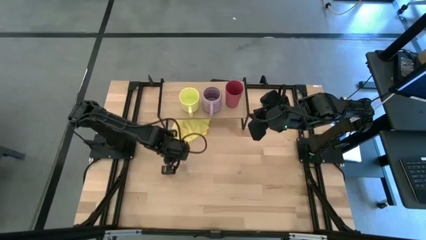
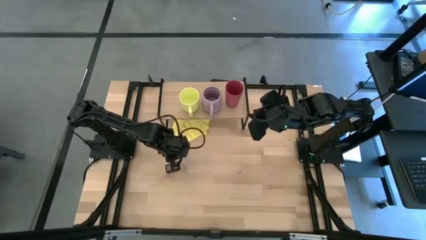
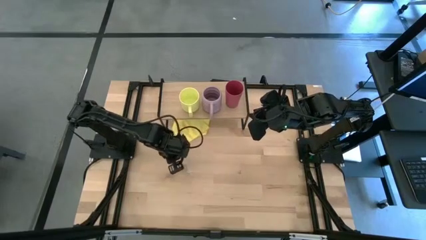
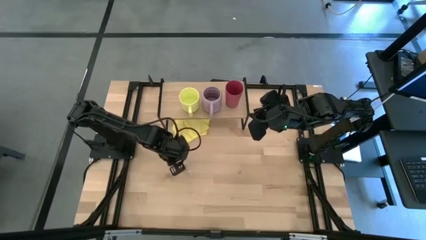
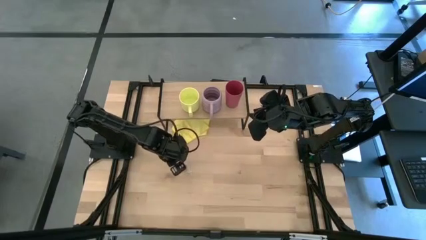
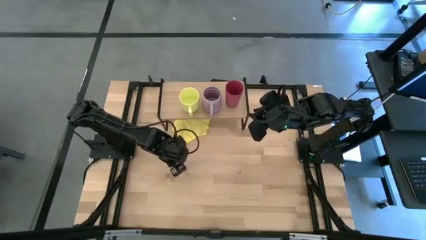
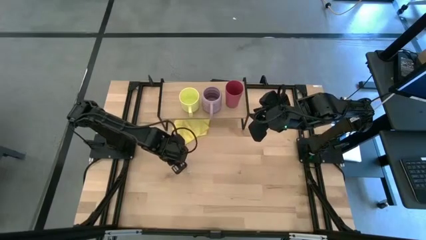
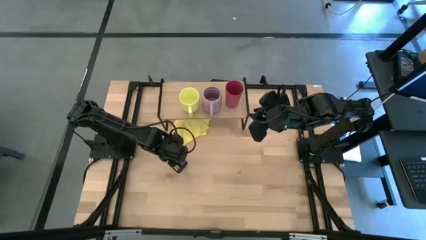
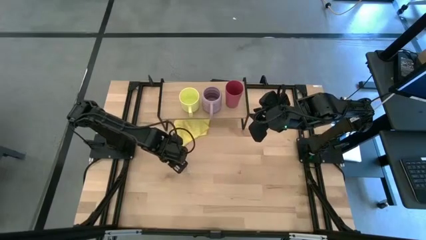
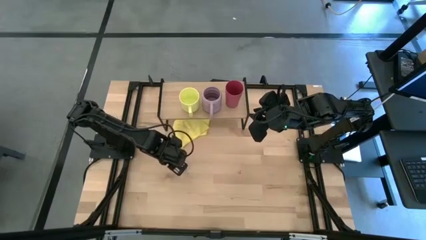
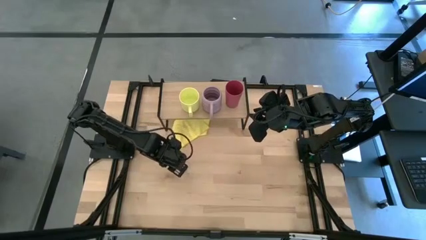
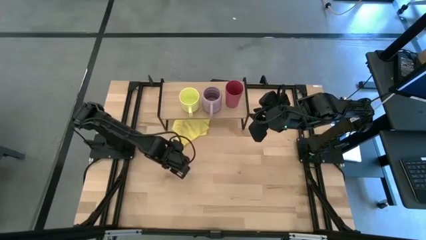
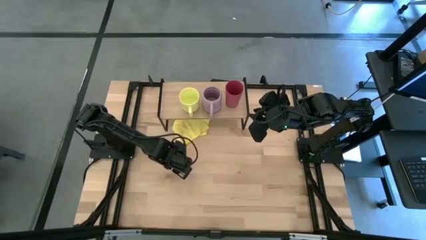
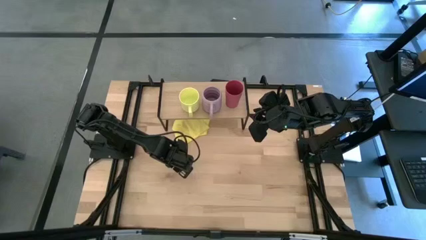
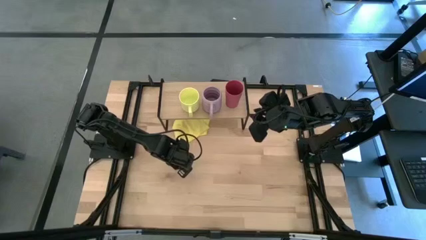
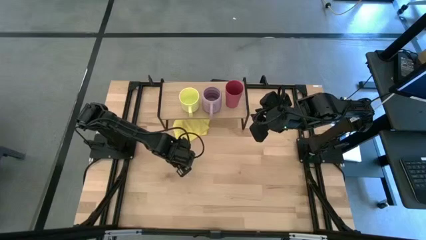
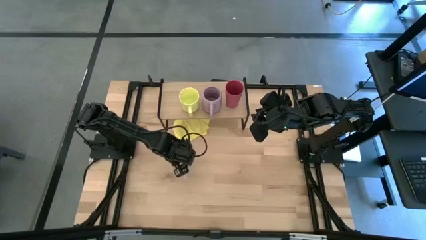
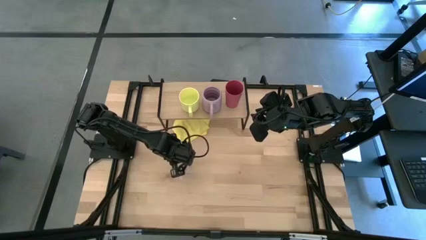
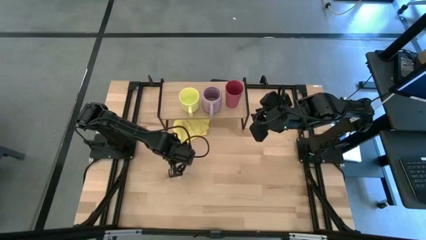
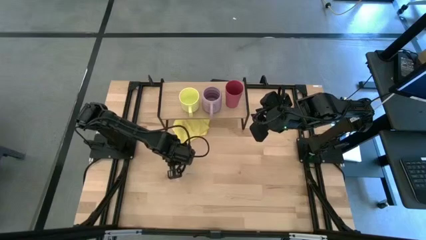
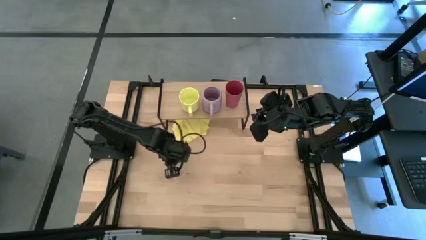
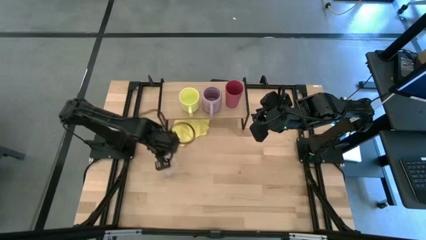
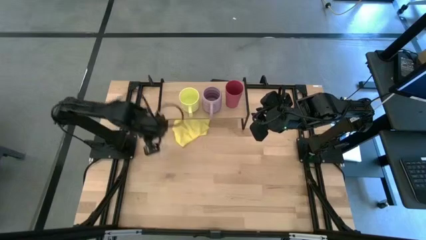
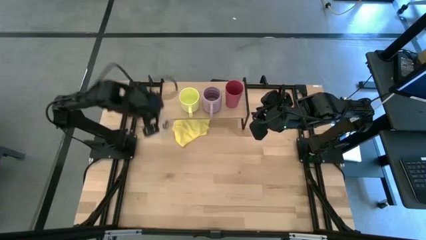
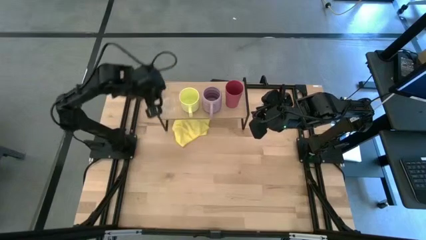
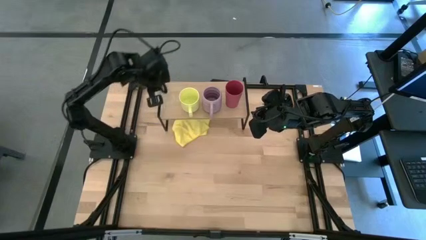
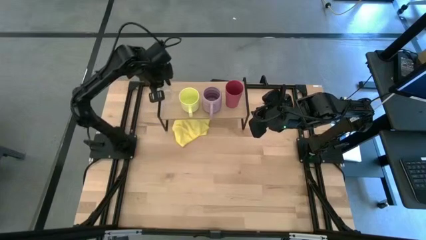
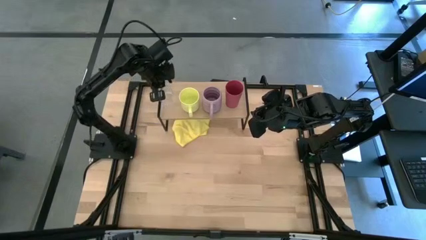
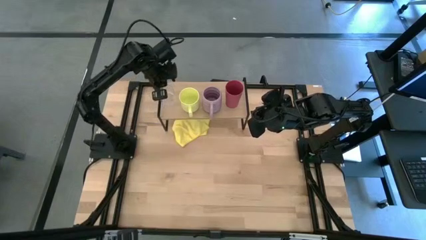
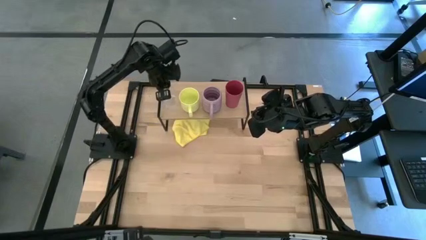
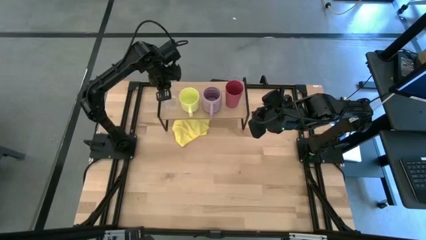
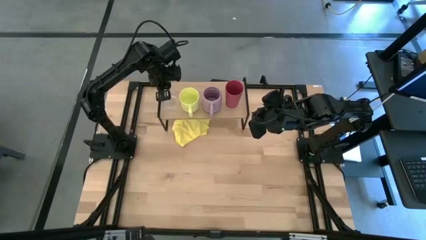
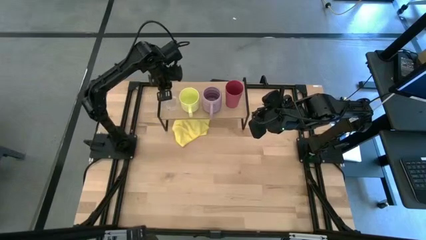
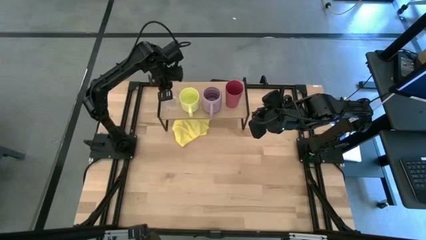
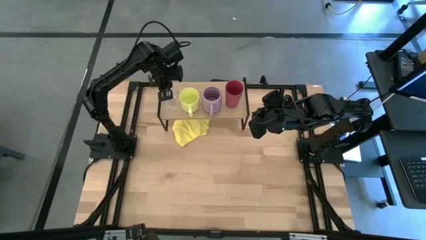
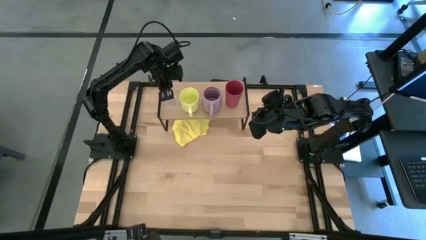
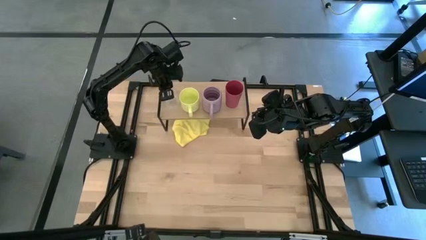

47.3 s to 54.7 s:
Task: Stack small to large cups/mugs on shelf
Put the transparent mug on the shelf

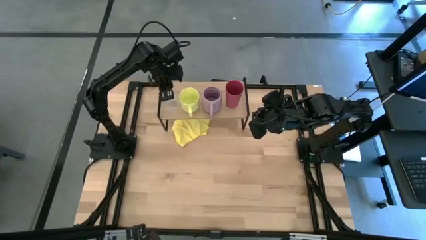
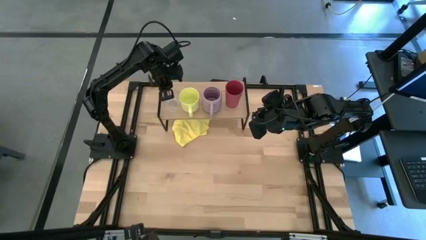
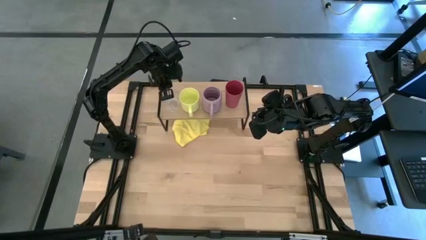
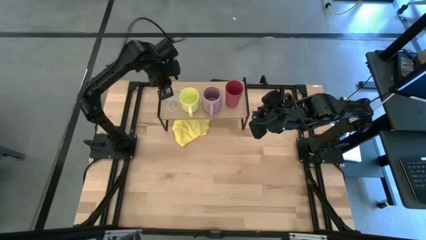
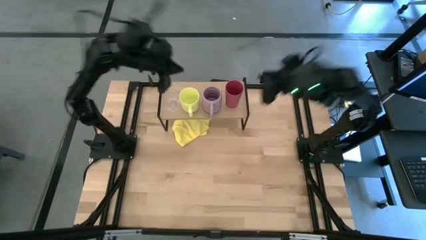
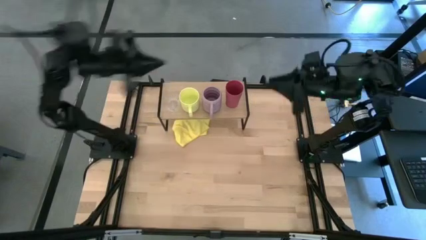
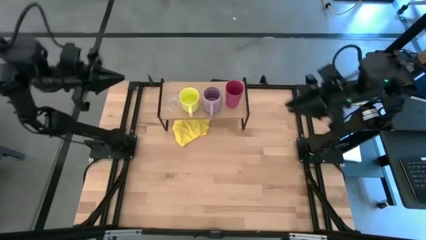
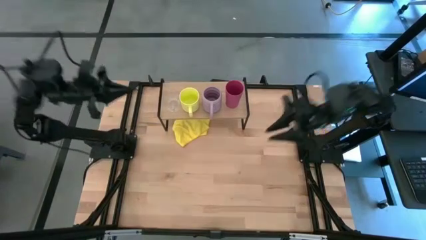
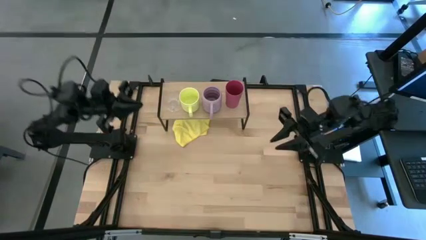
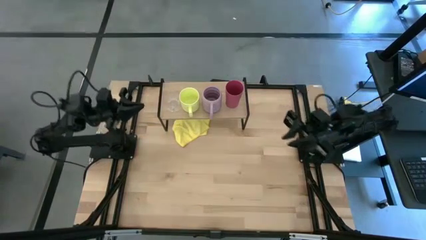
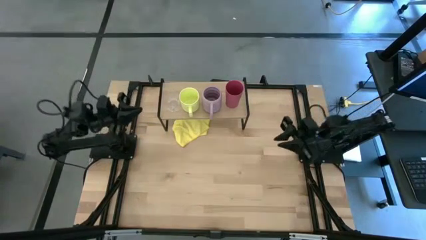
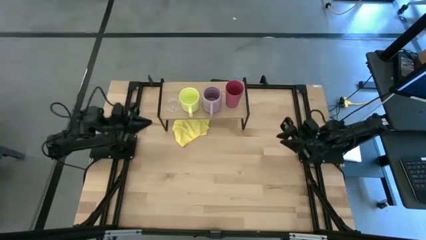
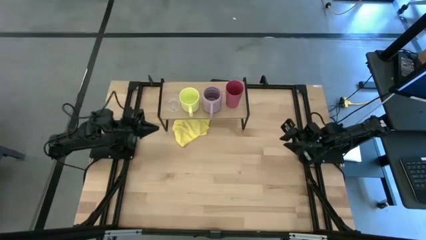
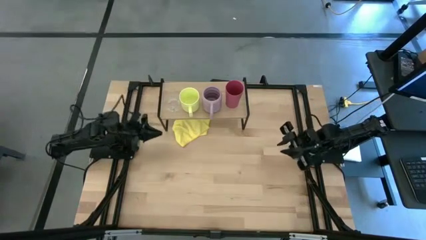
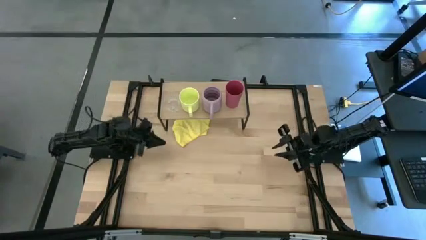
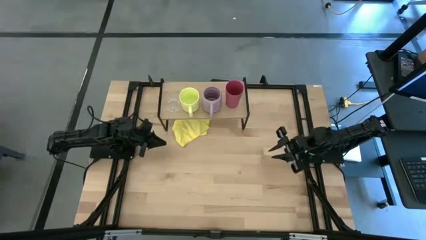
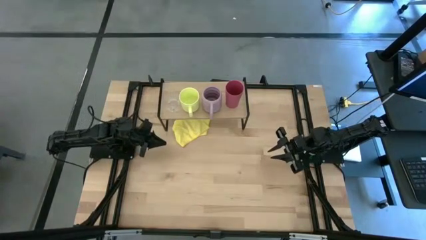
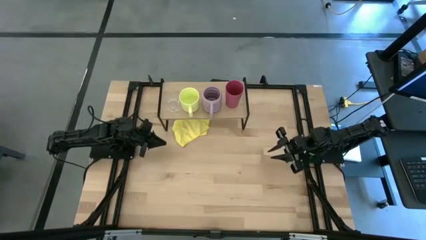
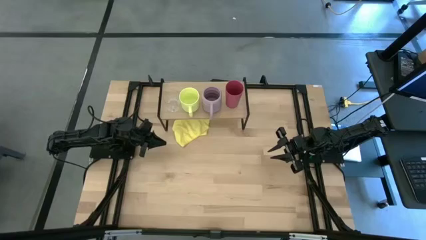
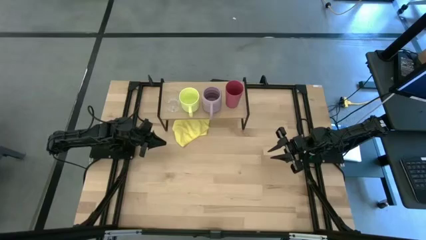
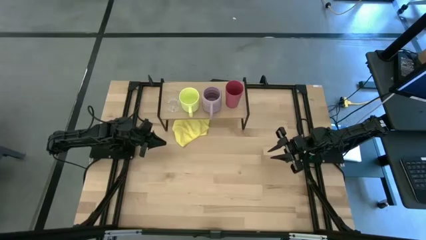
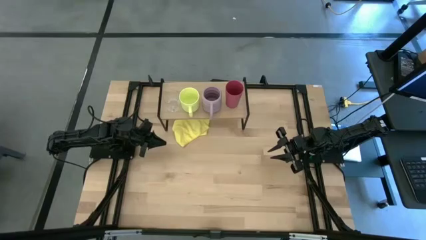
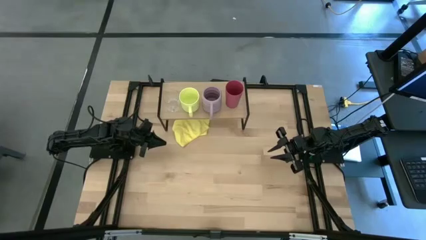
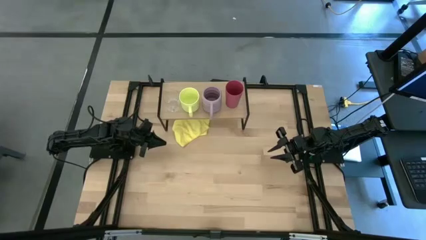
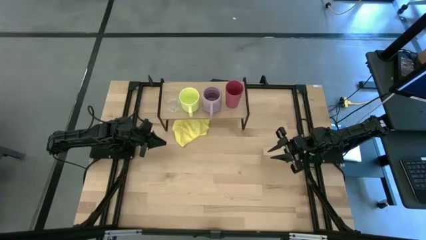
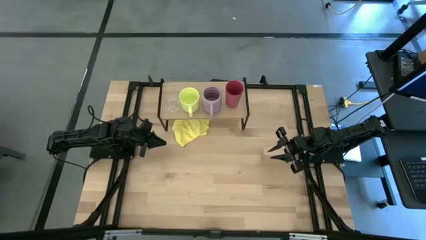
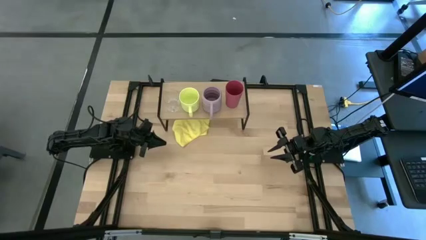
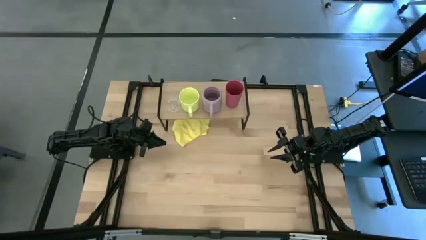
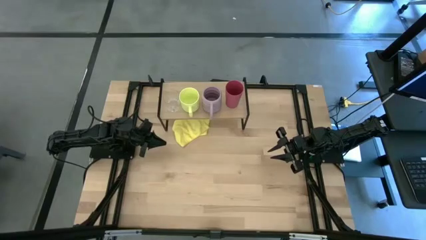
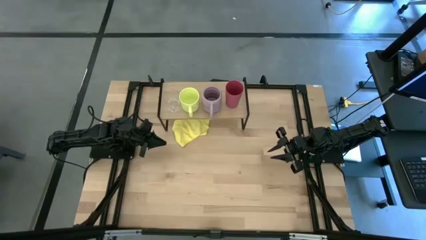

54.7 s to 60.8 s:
Return to Home Position

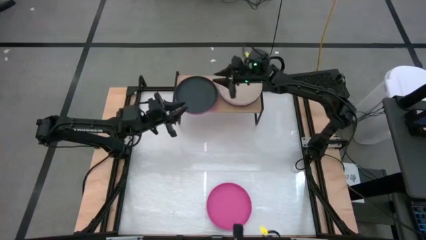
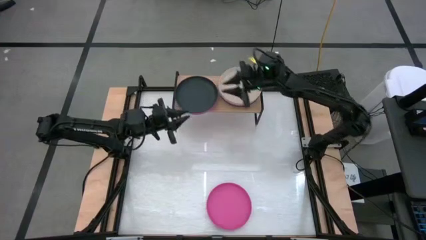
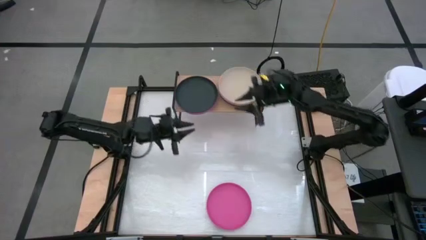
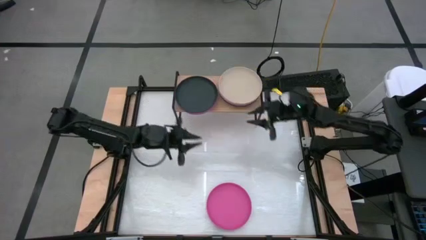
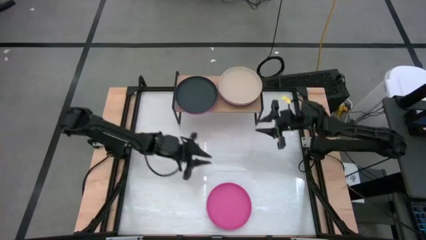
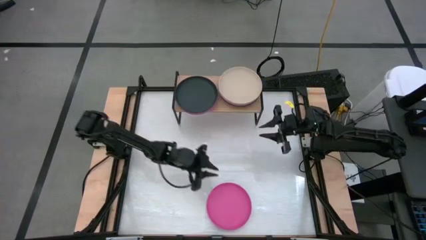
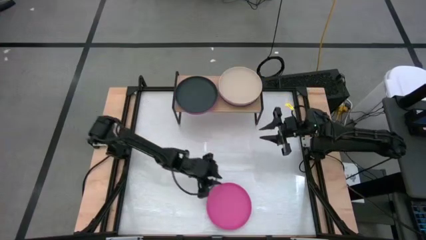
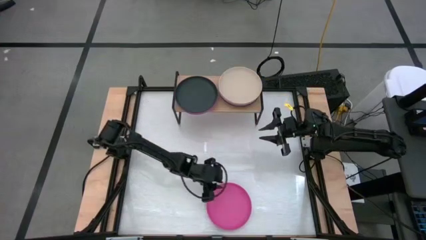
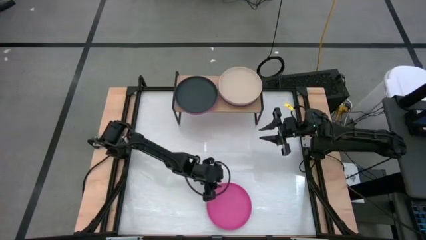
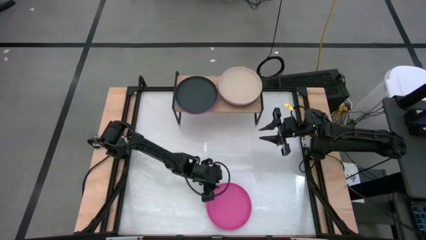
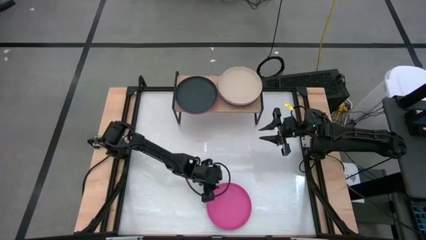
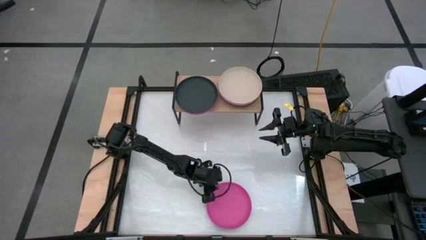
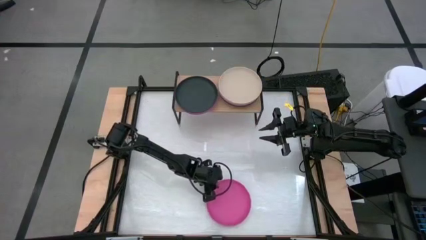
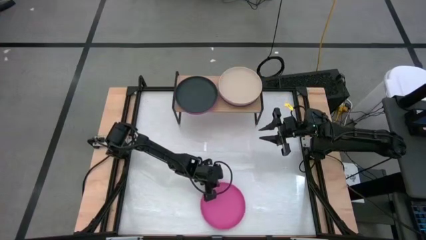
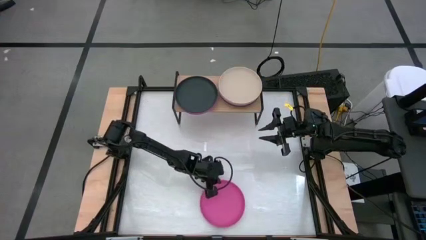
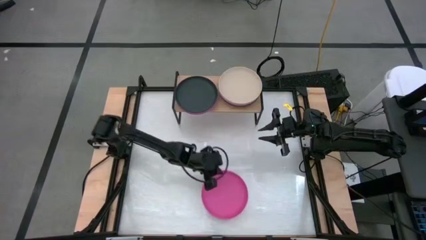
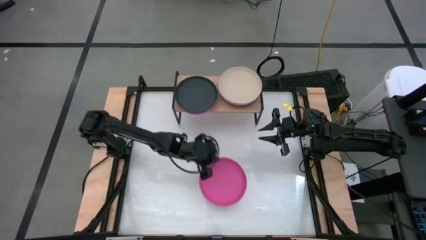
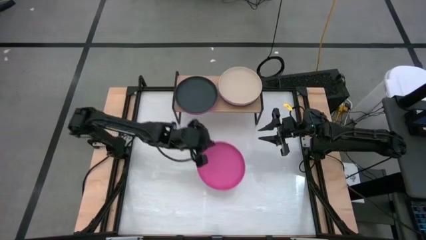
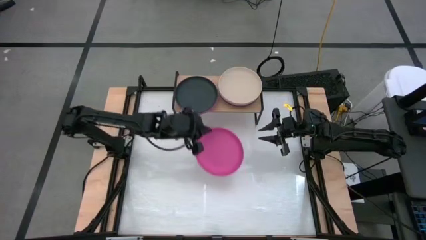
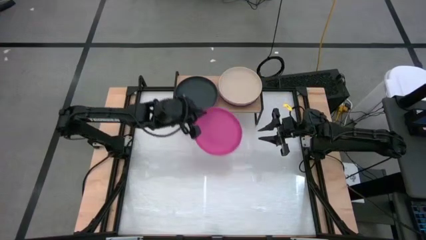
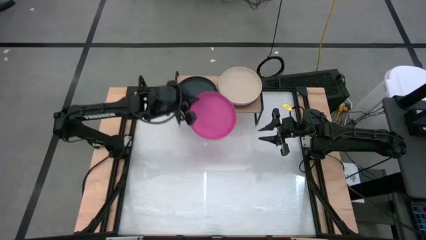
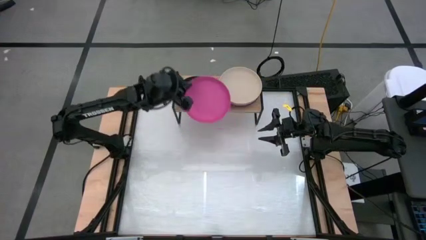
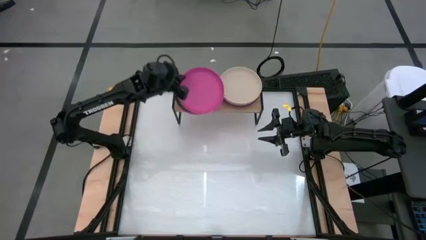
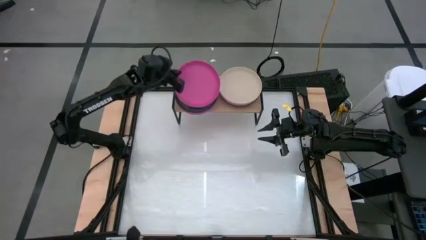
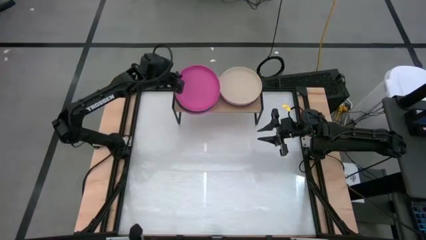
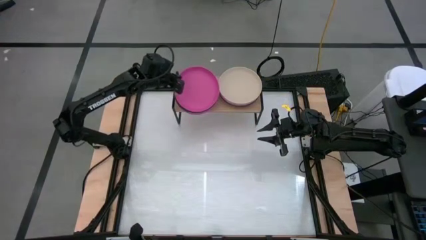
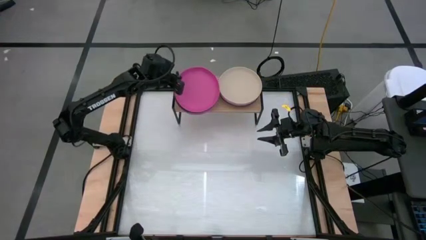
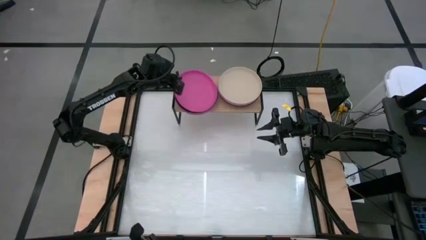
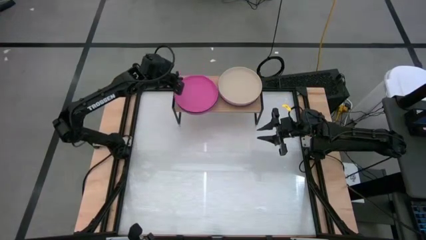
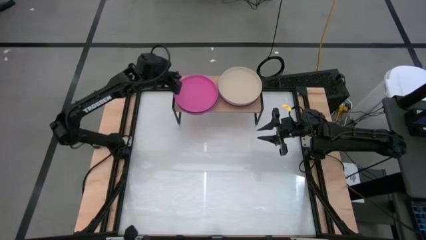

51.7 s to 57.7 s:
Task: Place and stack plates onto a shelf
Stack the pink plate on top of the black plate on the shelf
